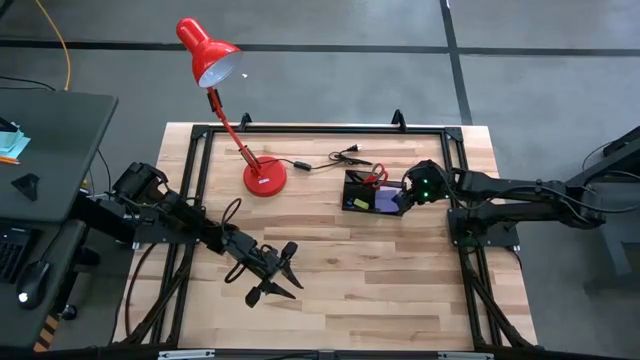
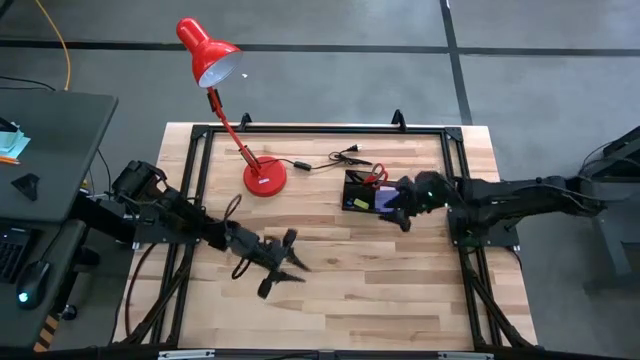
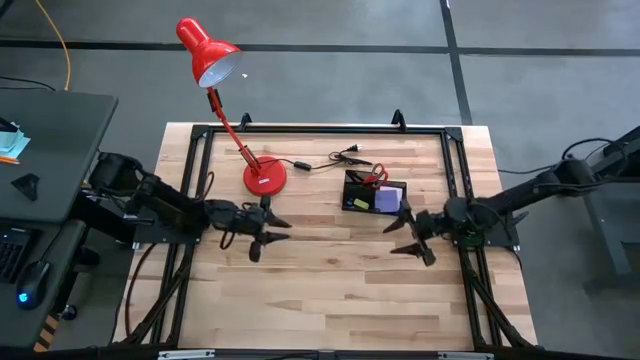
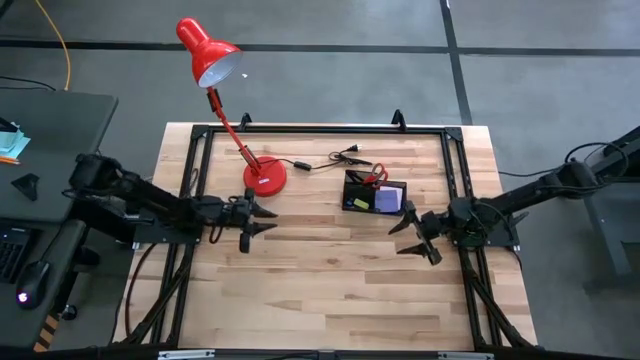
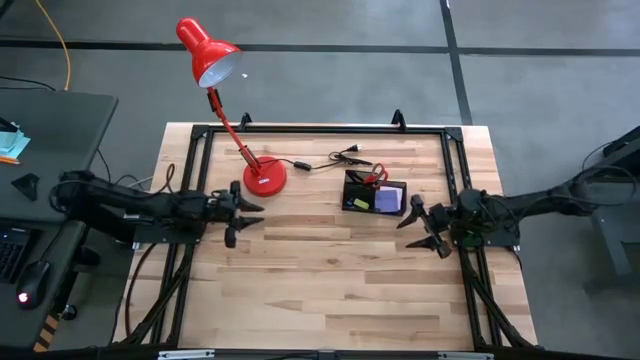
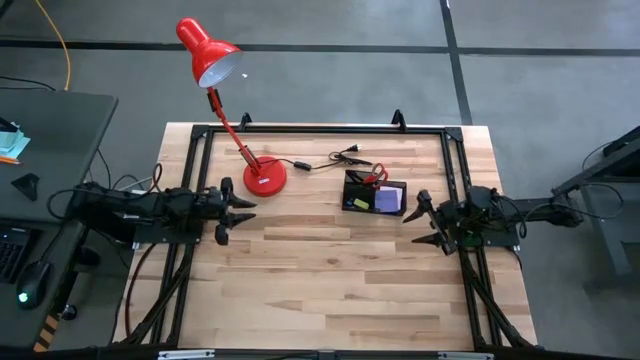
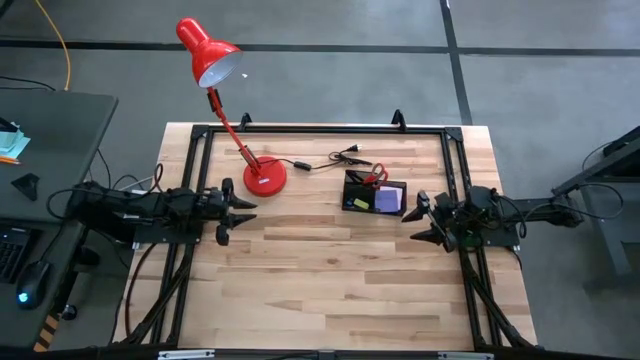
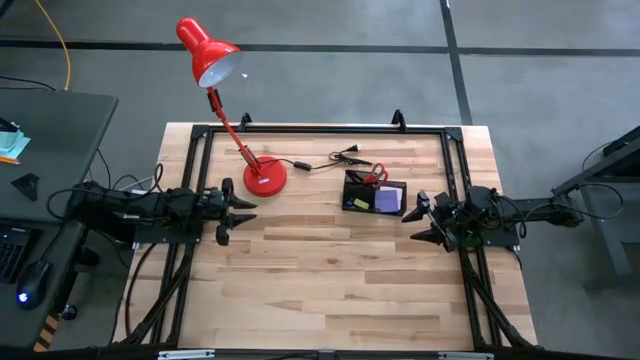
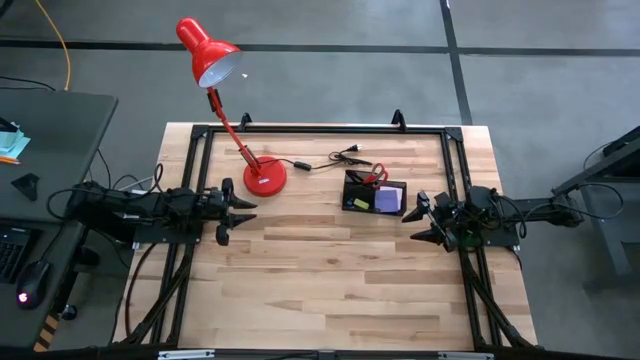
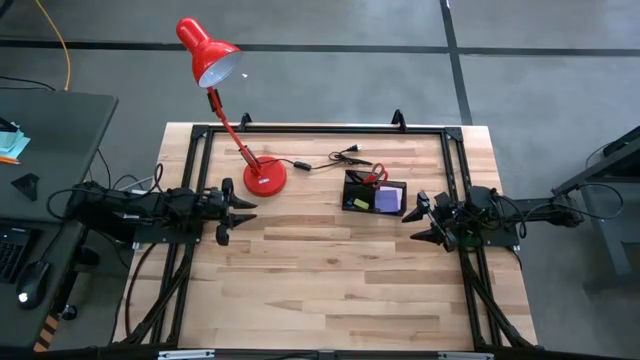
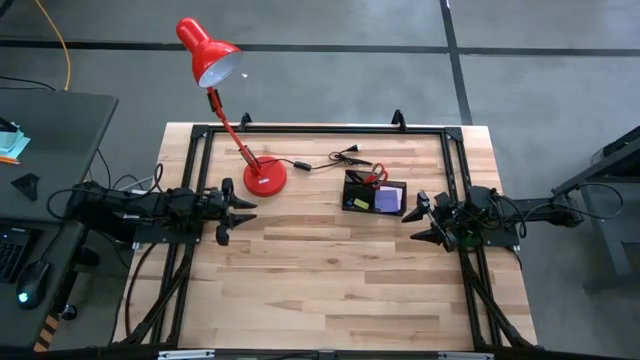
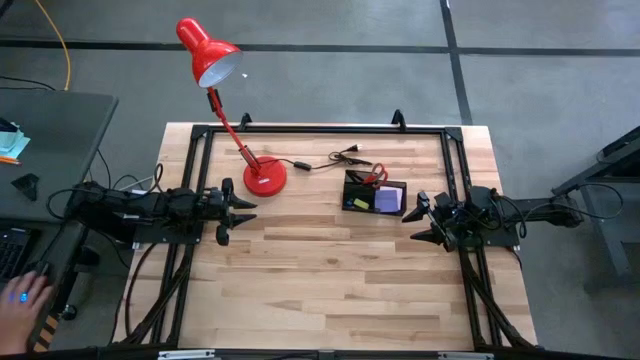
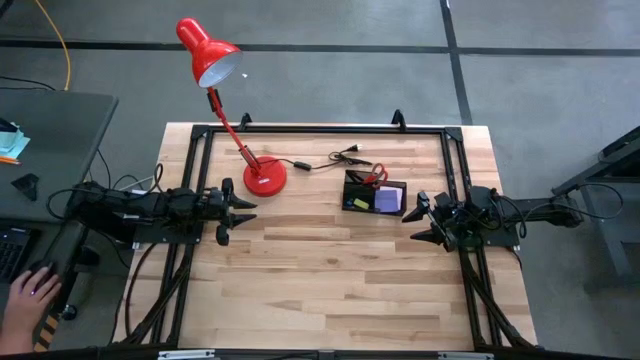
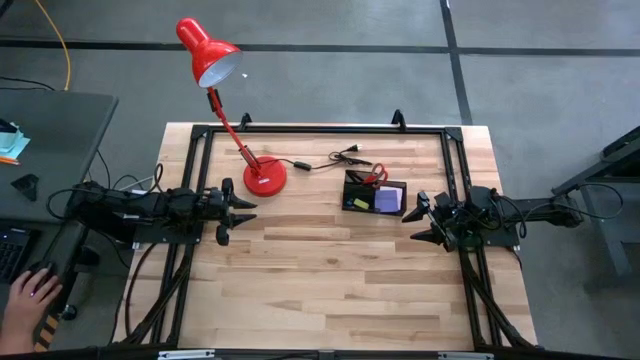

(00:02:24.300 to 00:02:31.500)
Task: Pick and place office supplies into organizer
Return to Home Position

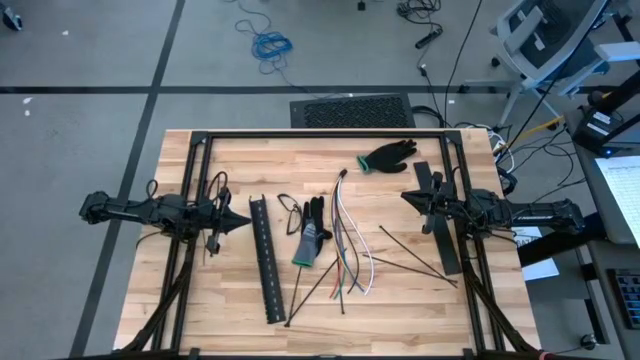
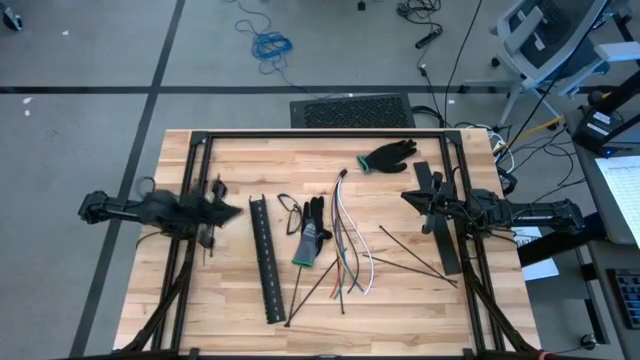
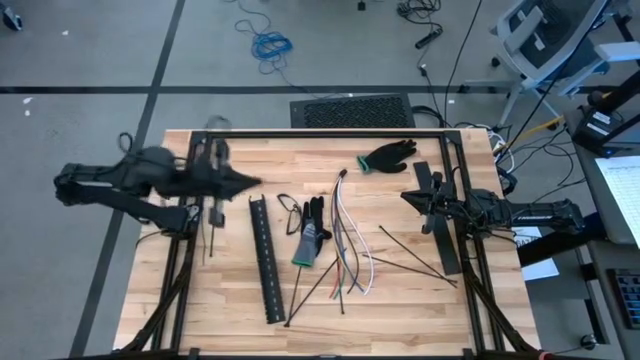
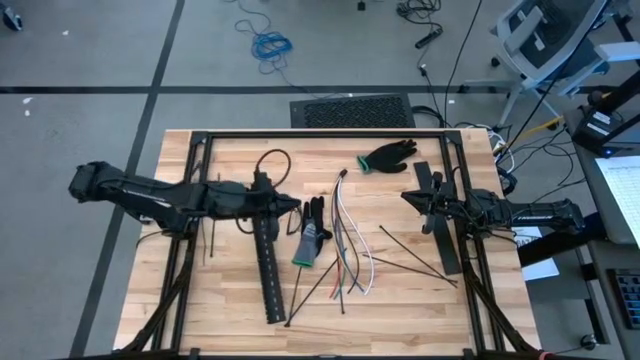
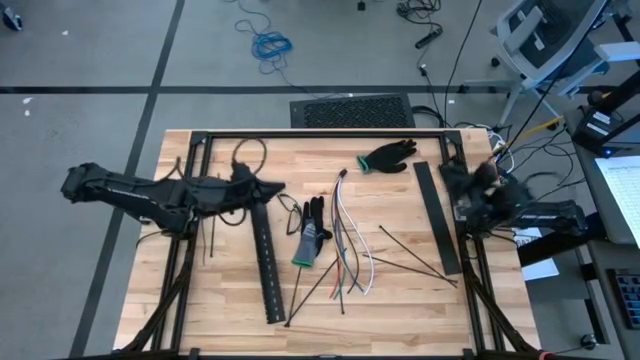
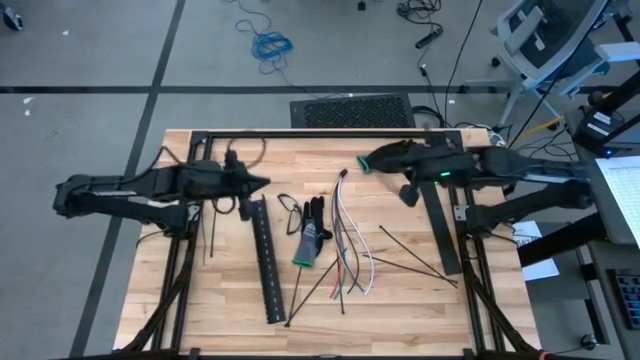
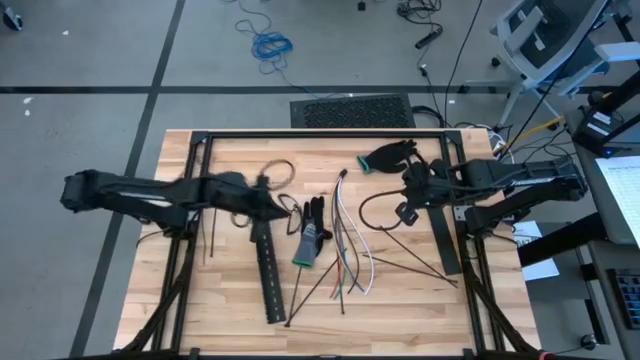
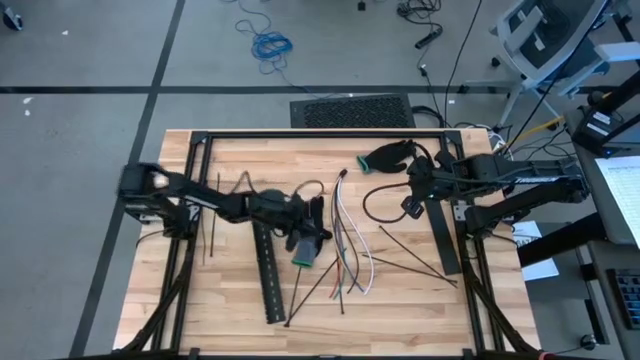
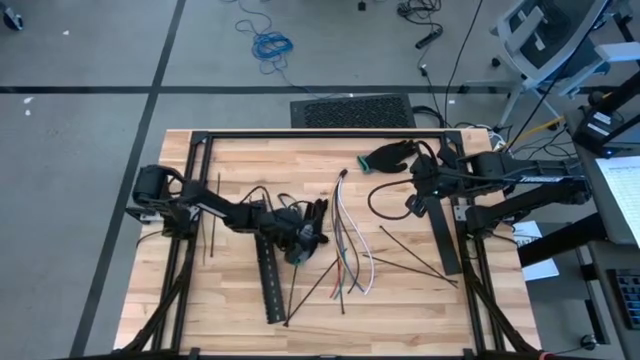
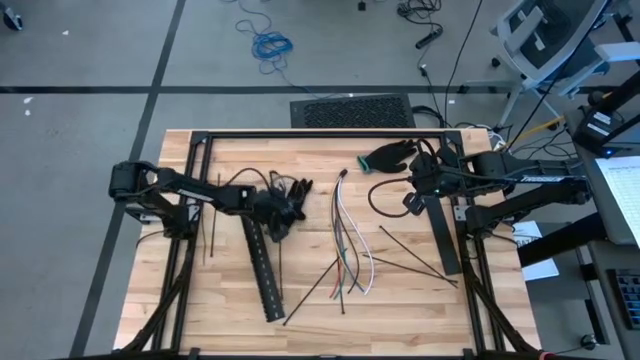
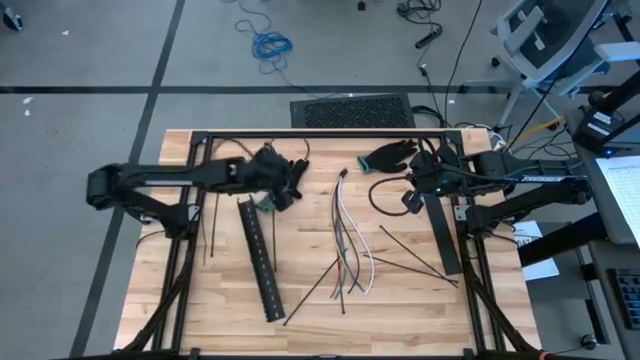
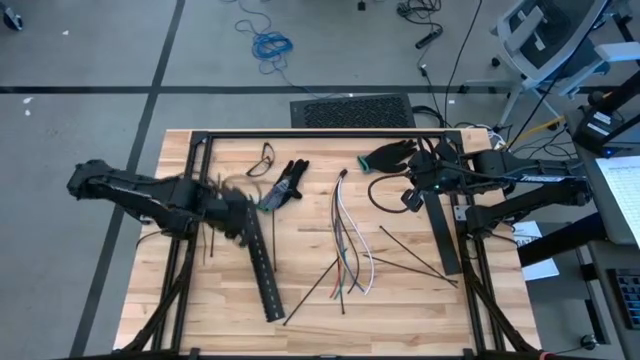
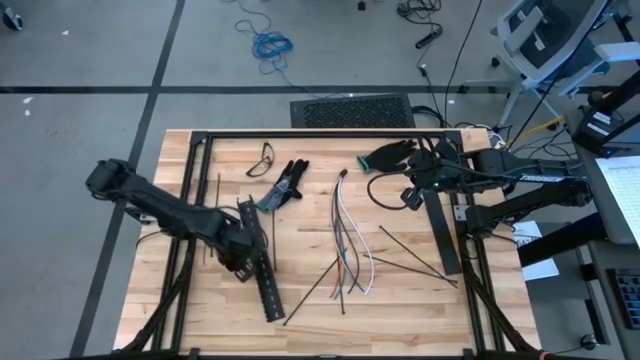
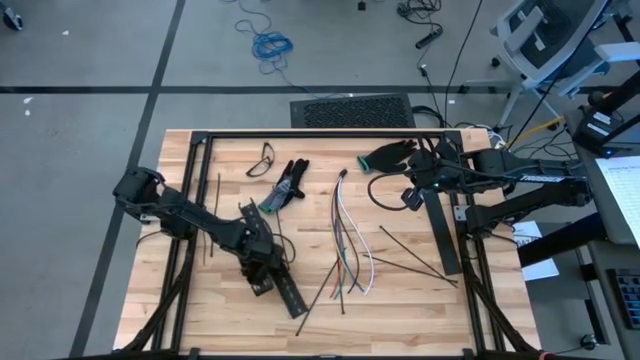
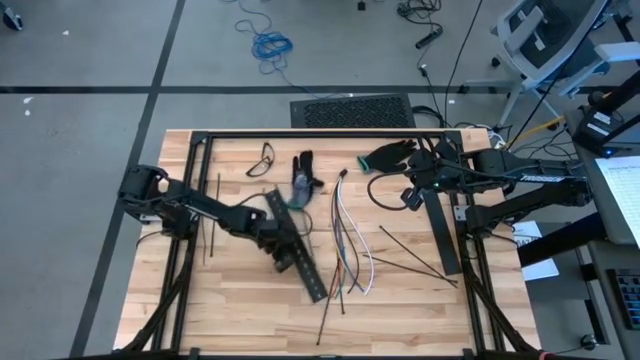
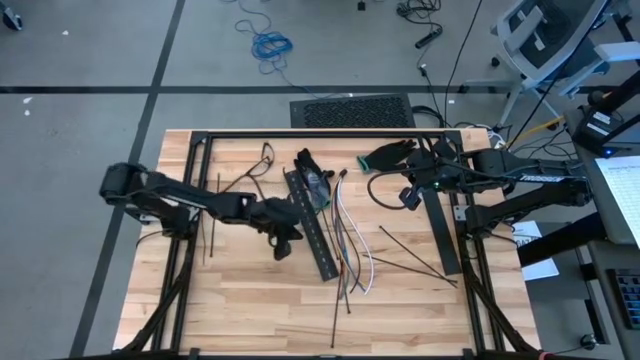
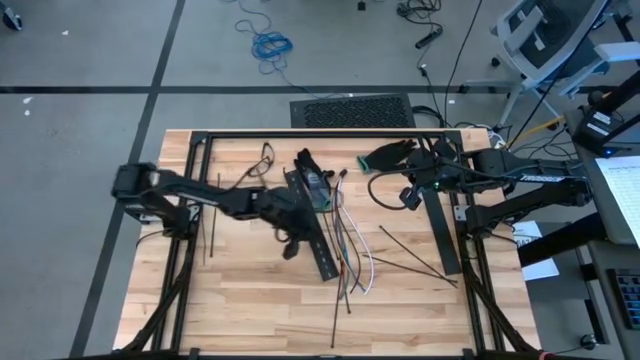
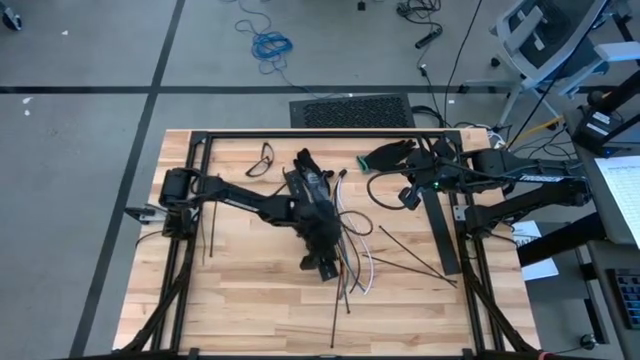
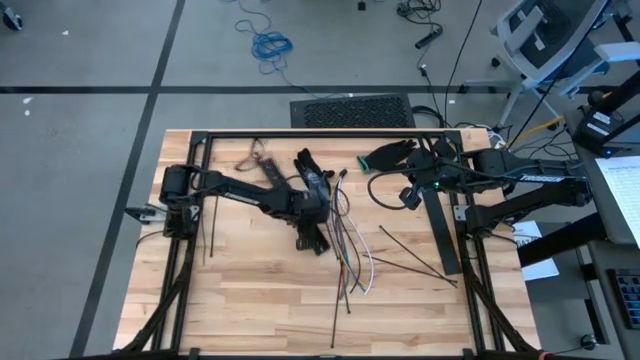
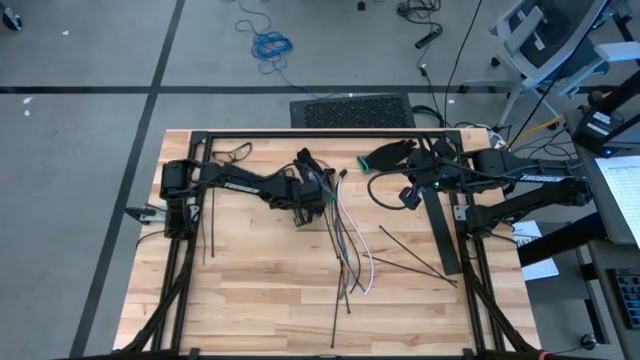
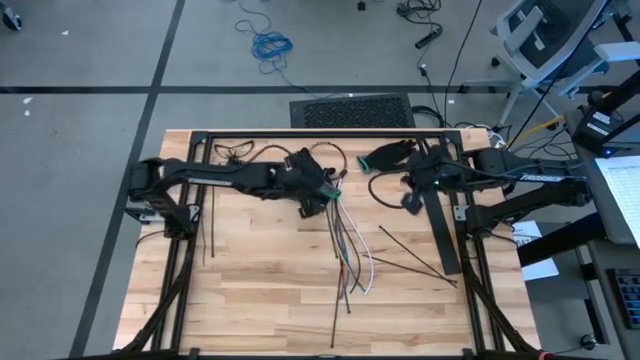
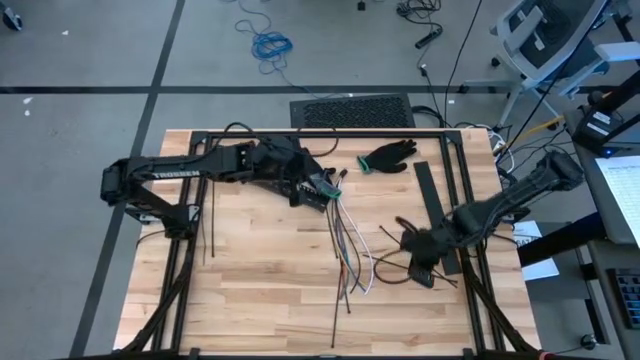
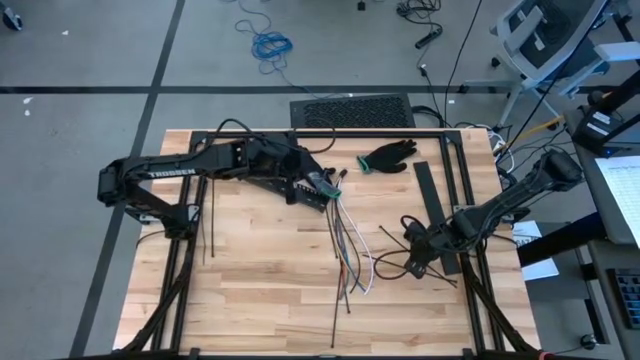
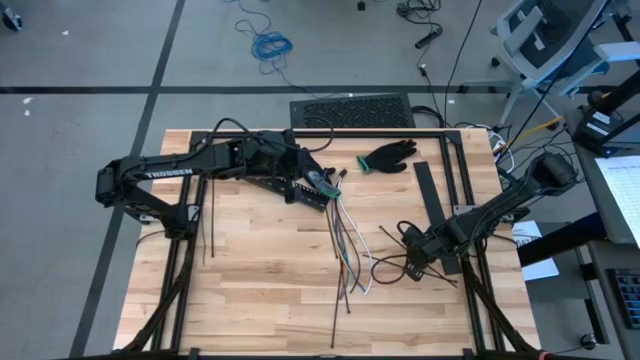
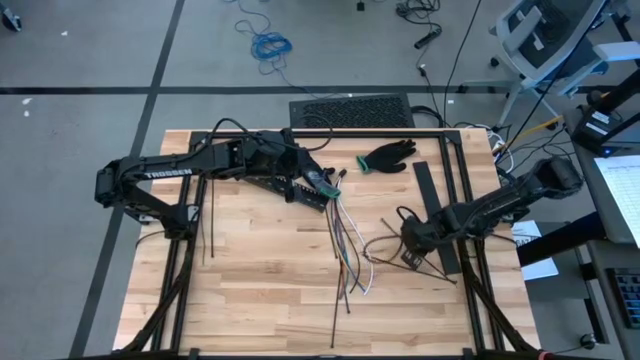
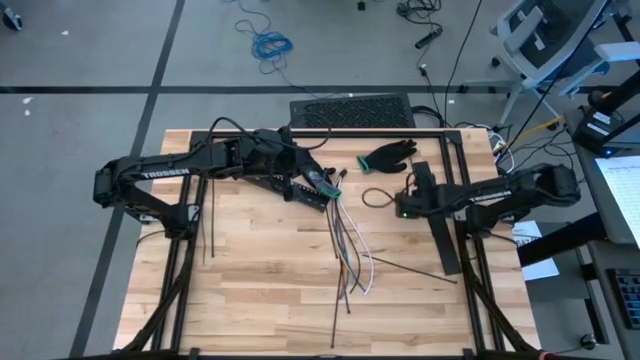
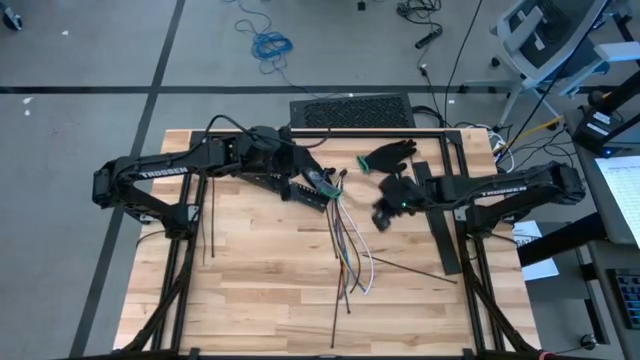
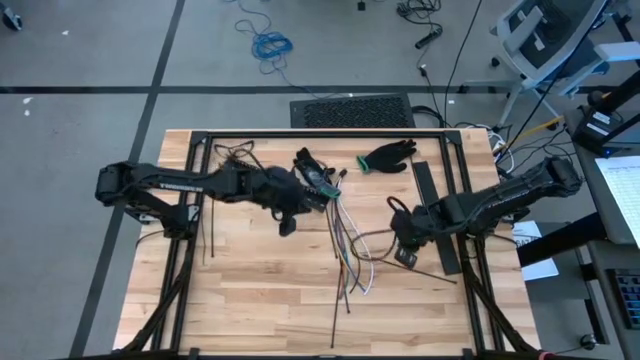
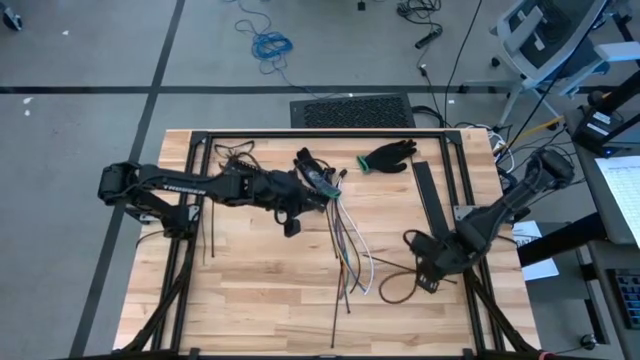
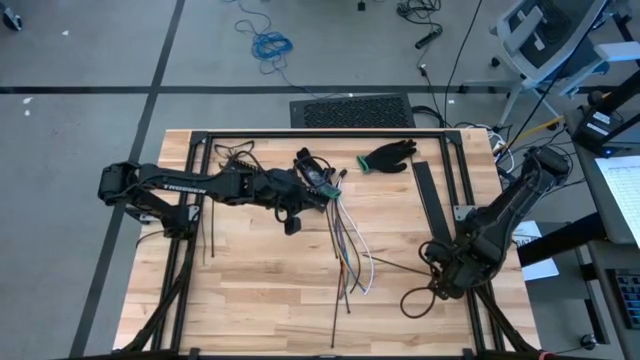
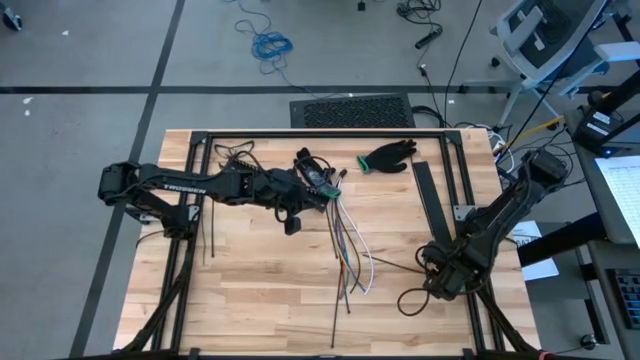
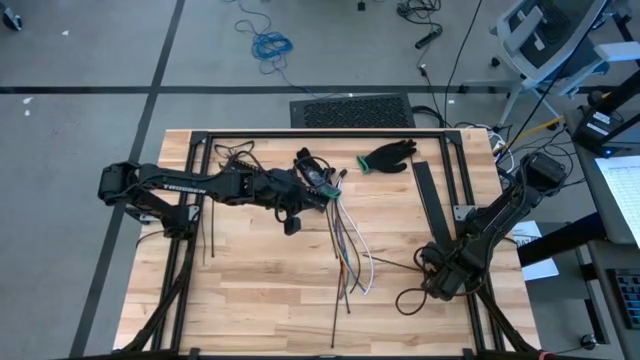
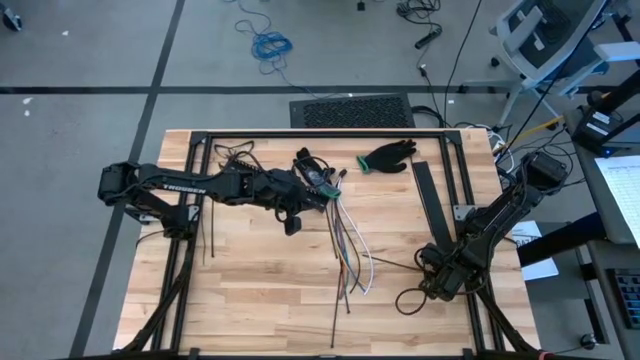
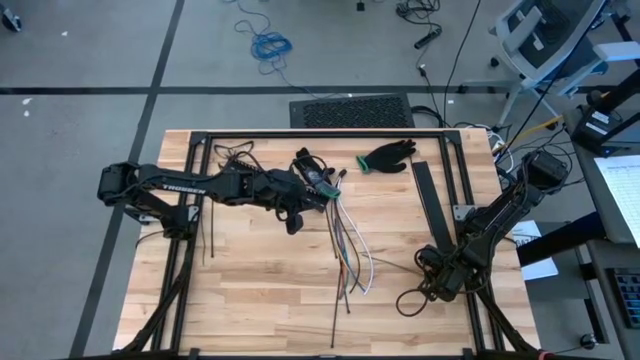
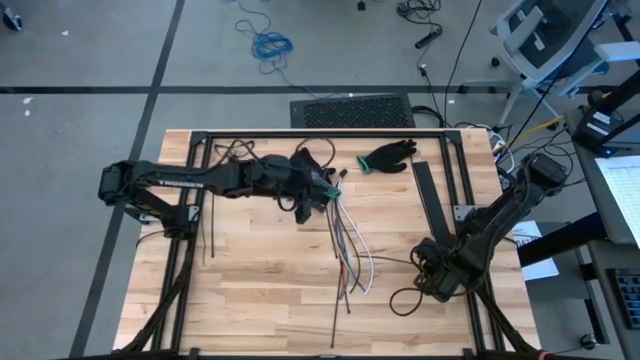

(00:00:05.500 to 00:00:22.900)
Task: Ziptie cables
Insert the black zip tie into the lock head
